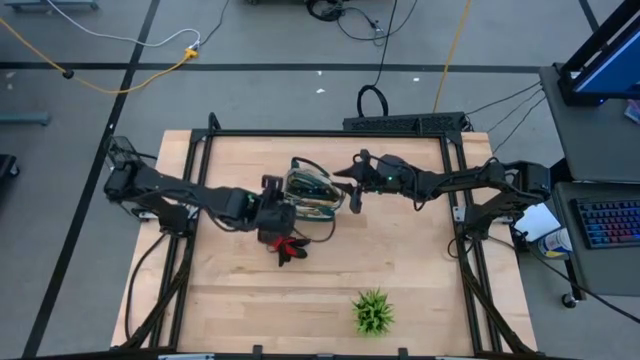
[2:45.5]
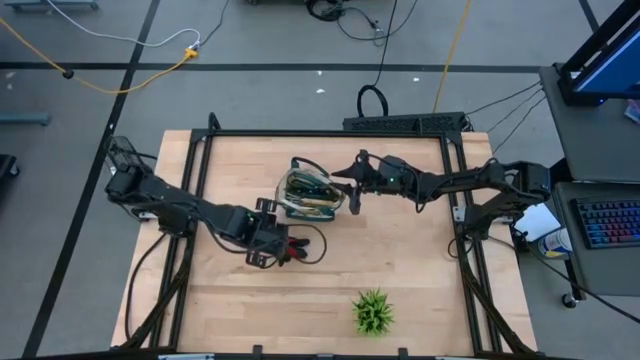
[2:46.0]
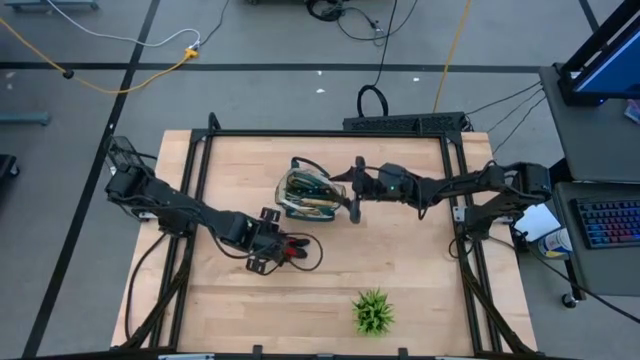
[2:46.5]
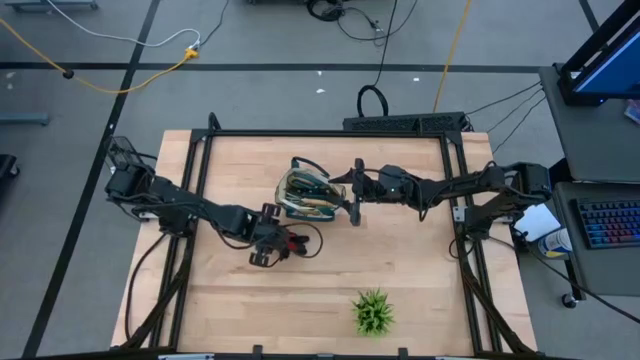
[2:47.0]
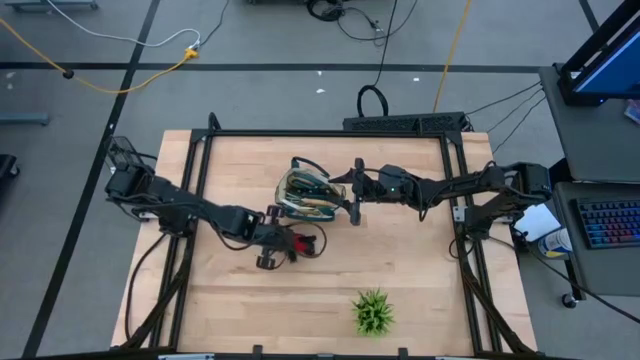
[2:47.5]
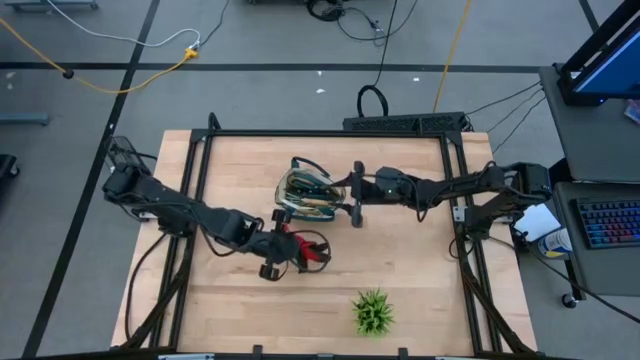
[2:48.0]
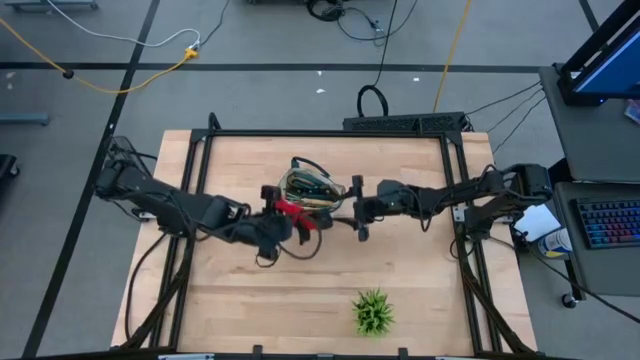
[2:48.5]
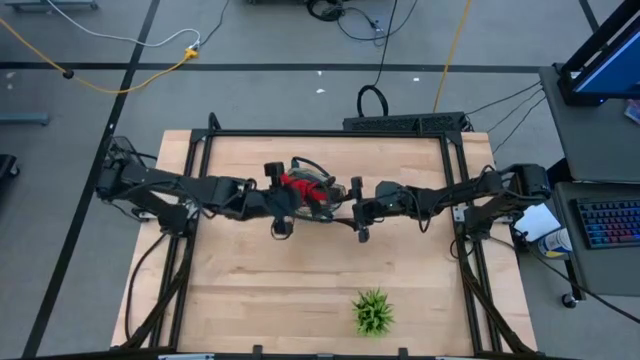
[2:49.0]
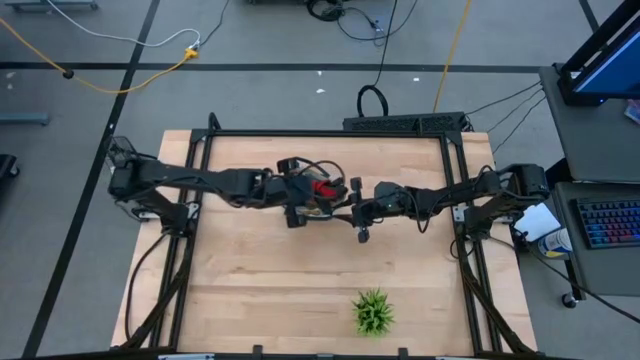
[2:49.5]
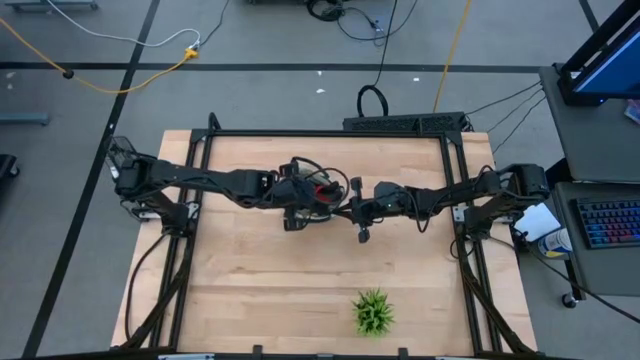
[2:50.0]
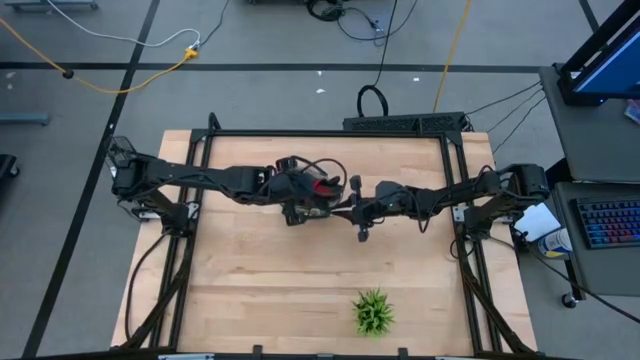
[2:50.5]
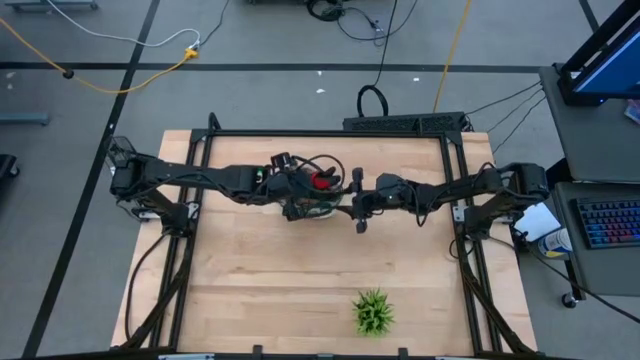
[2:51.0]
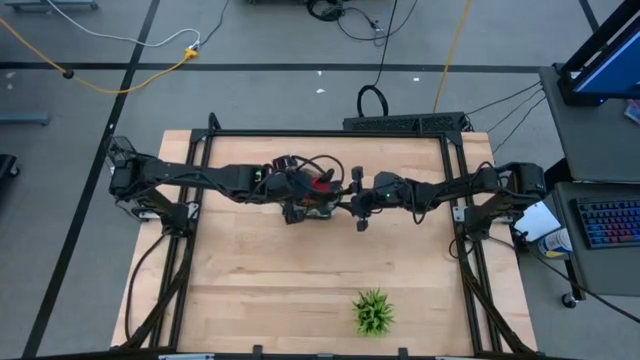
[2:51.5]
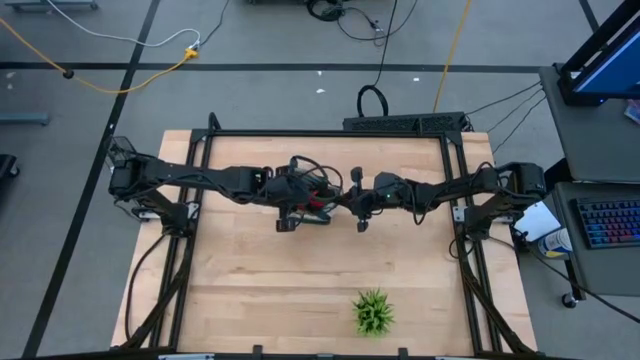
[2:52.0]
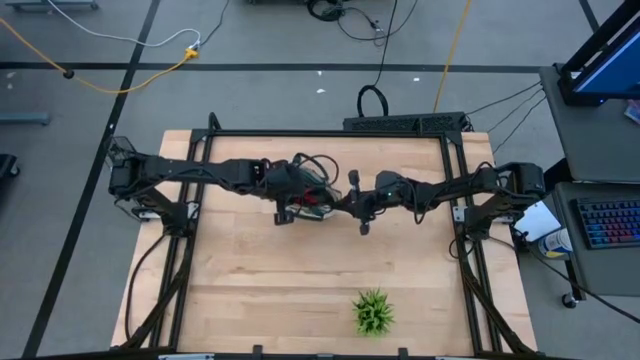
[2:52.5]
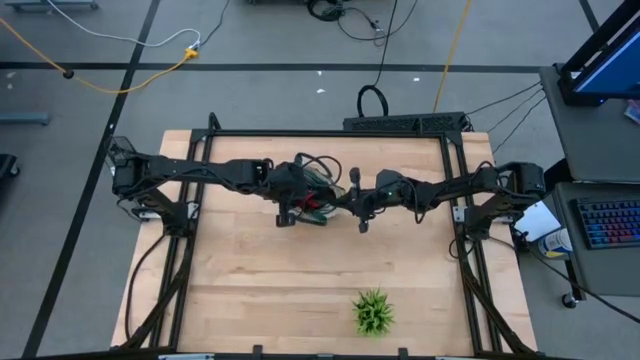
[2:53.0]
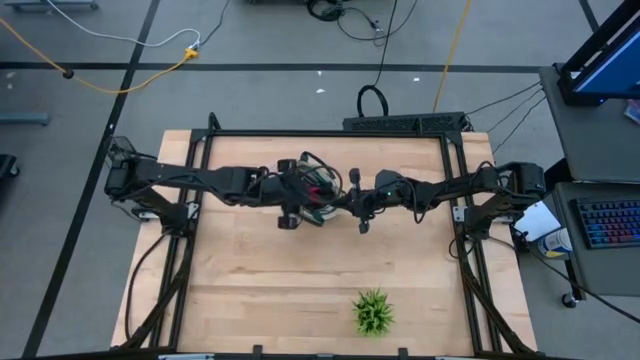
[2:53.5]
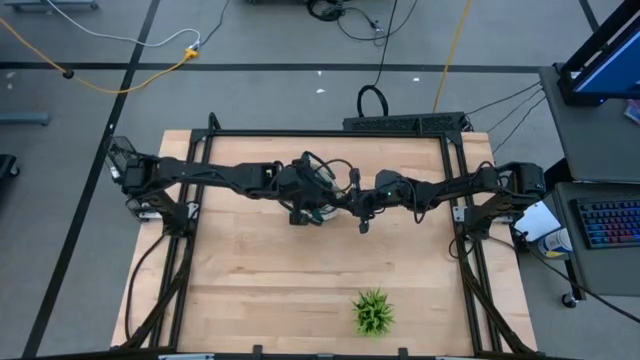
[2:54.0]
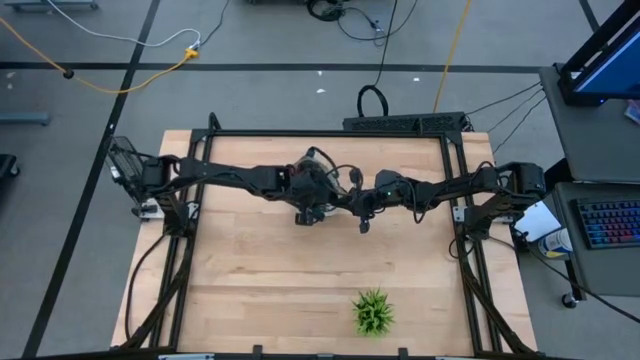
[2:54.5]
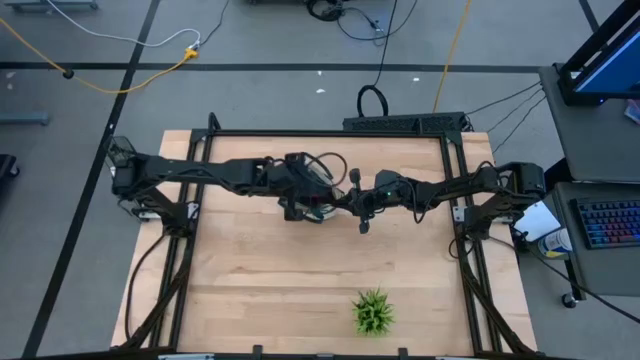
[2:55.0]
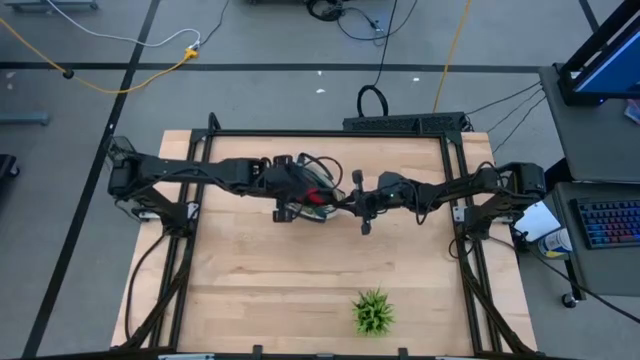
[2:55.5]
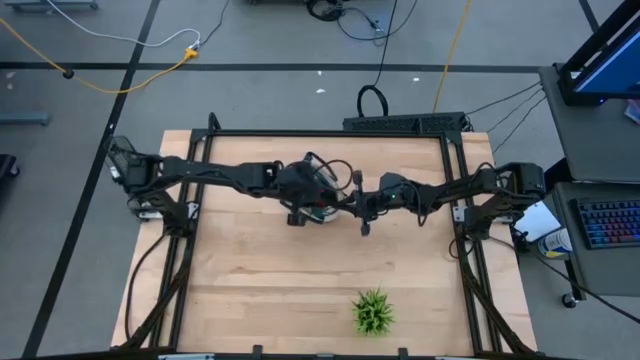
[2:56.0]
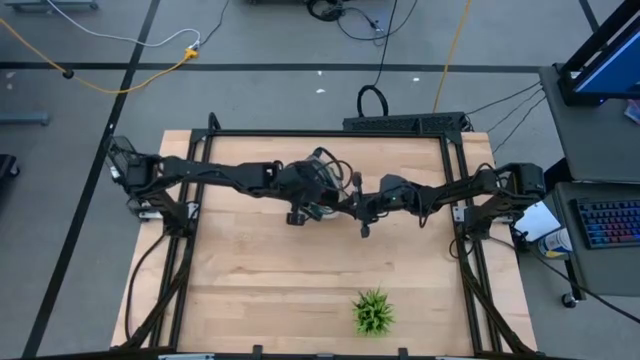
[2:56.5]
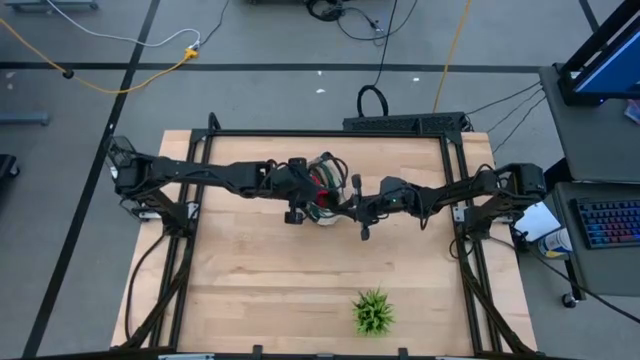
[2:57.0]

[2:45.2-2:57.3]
Task: Pick & Place Garden tools in Gardening bag
Put the red gloves into the gardening bag

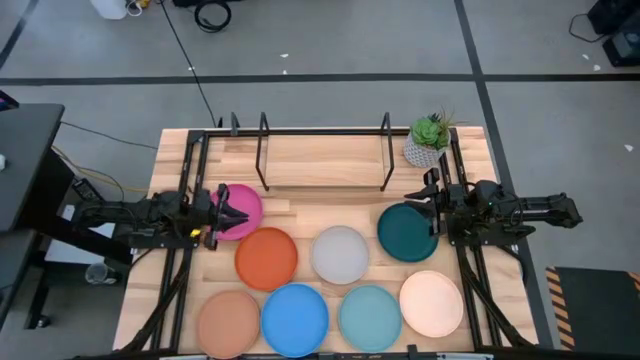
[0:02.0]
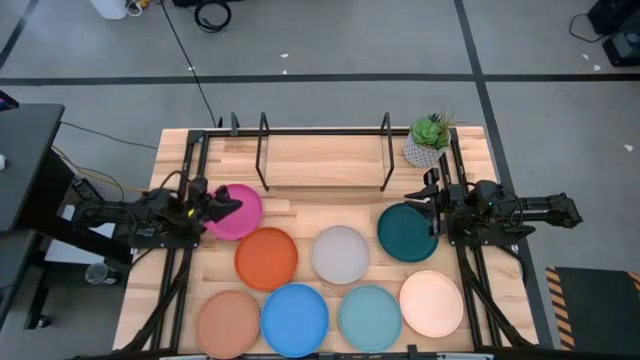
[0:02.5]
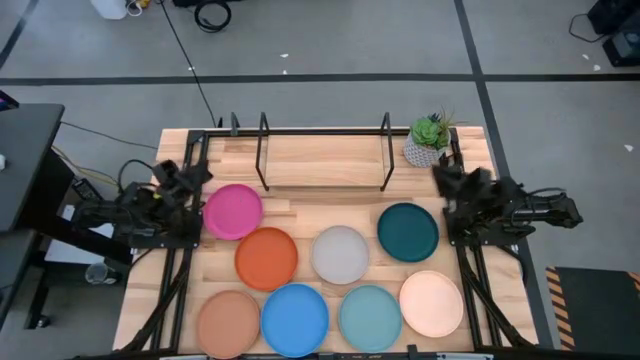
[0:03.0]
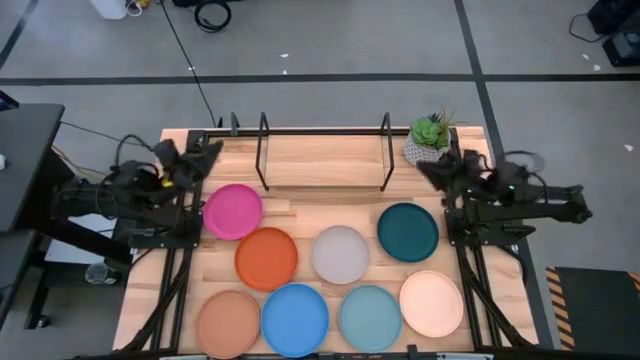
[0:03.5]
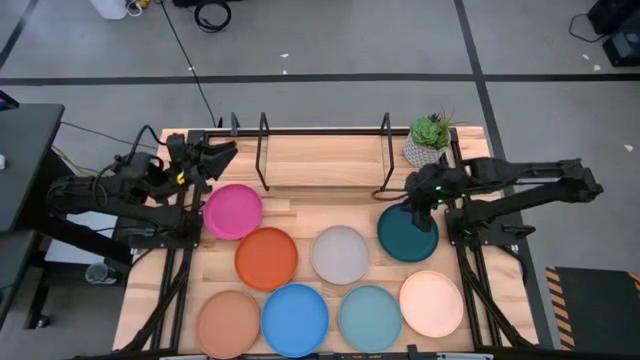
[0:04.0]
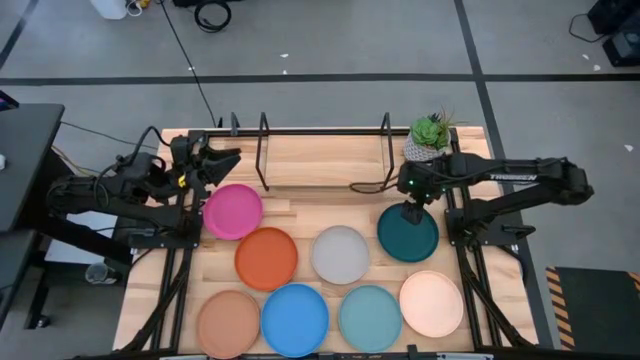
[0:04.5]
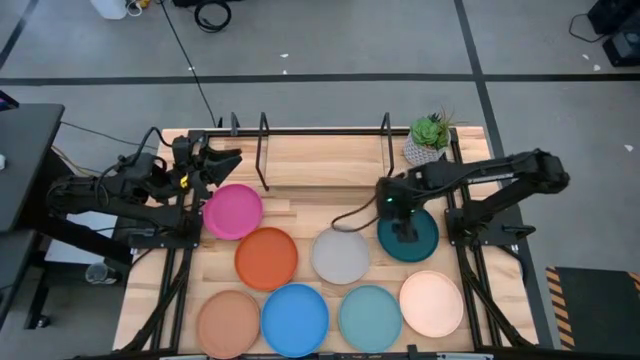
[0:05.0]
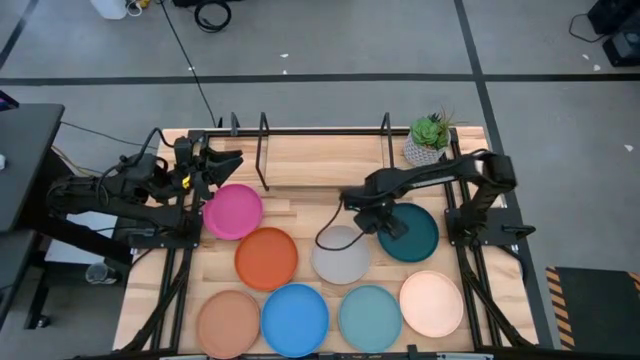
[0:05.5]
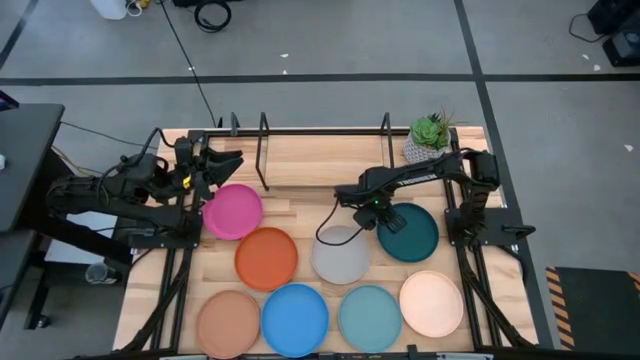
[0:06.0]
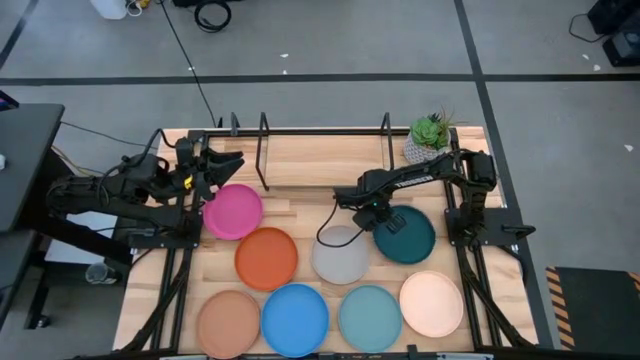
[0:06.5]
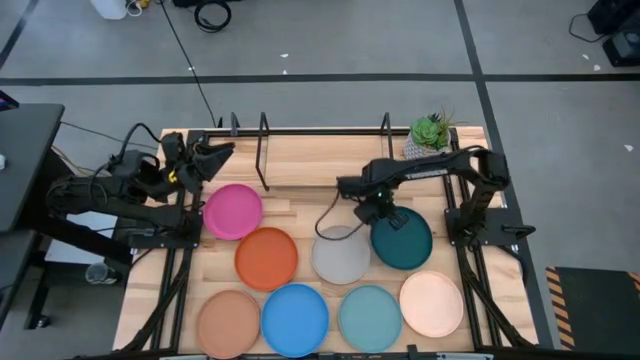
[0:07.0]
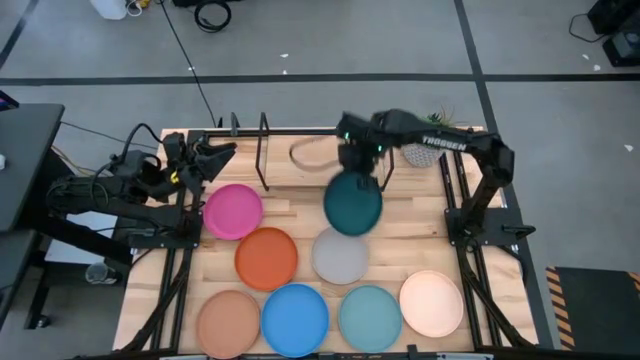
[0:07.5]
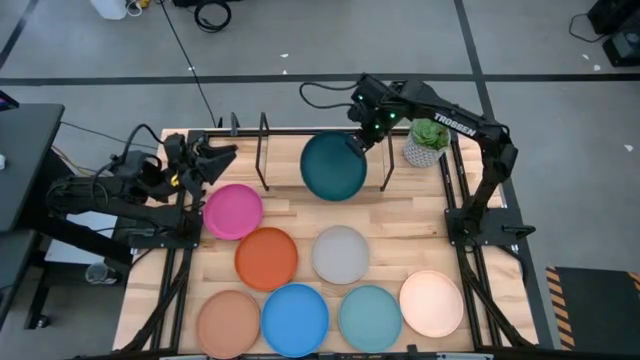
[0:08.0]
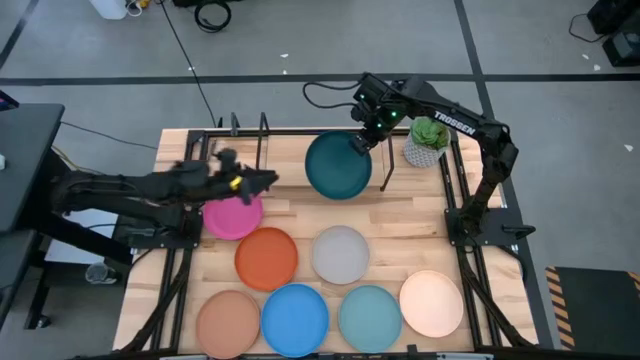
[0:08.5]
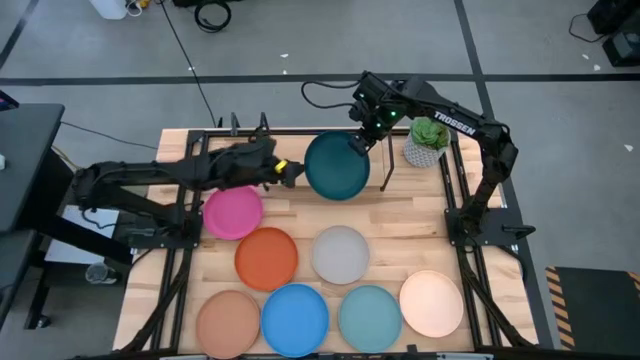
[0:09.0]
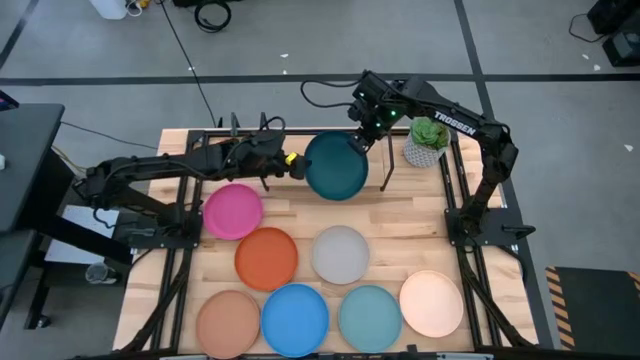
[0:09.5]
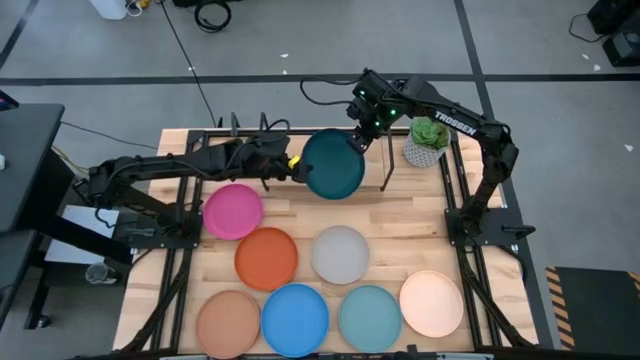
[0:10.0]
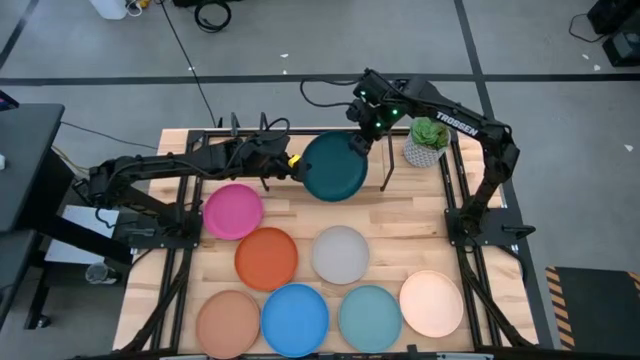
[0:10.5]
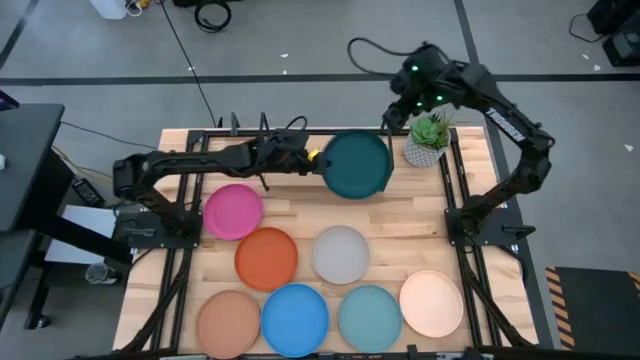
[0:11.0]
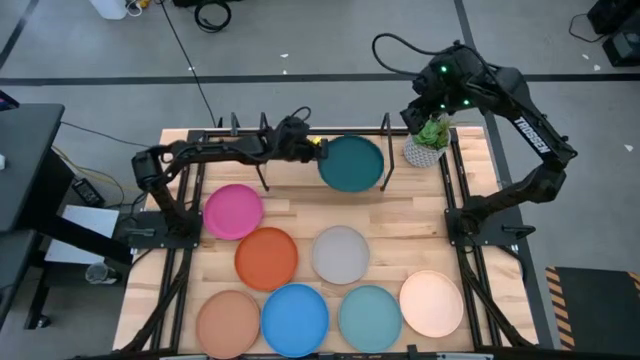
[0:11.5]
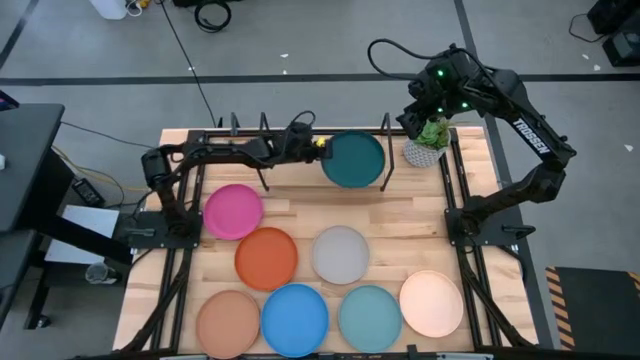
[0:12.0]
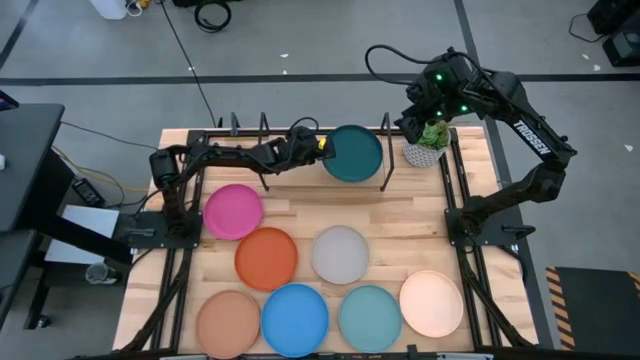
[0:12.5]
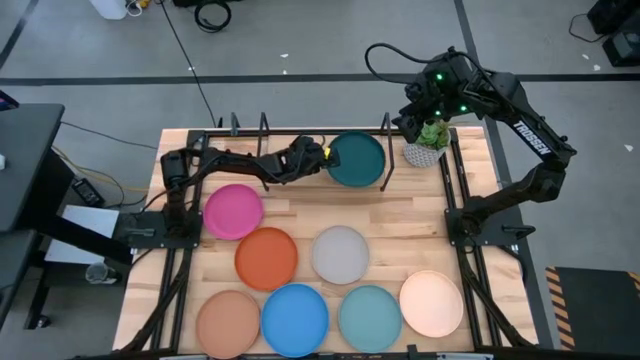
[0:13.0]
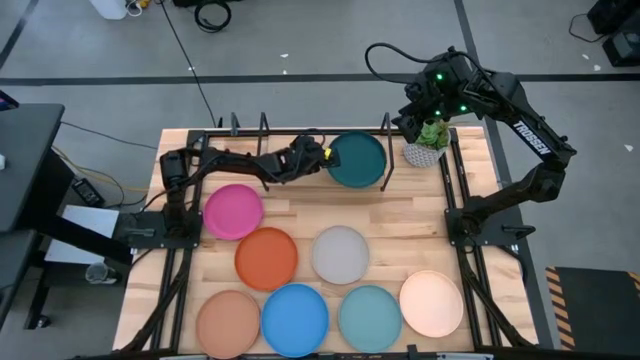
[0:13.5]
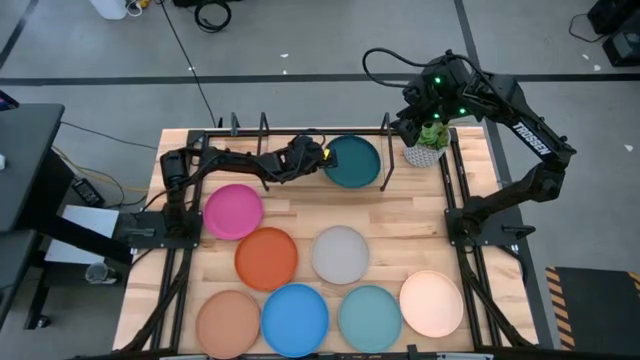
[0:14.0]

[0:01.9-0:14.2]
Task: Place and stack plates onto a shelf
Put the green plate on the shelf
